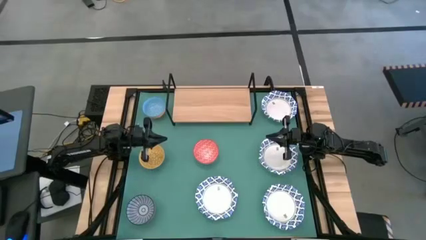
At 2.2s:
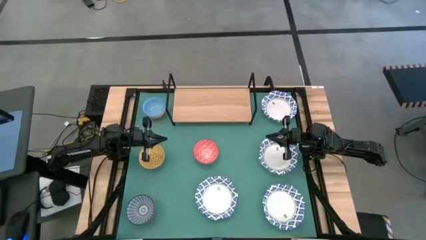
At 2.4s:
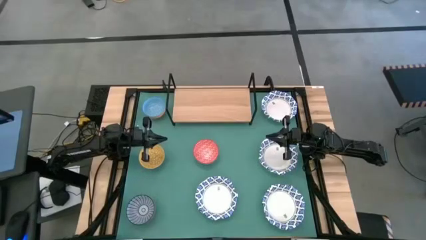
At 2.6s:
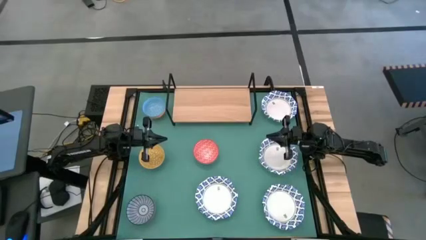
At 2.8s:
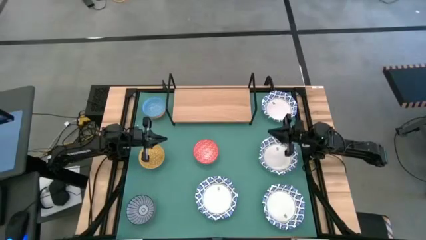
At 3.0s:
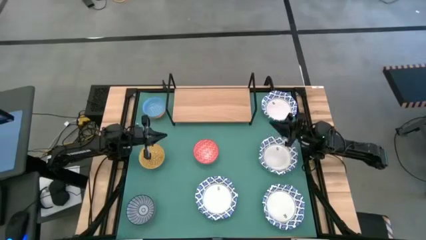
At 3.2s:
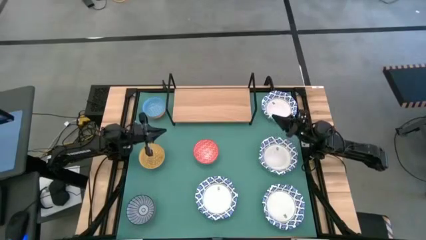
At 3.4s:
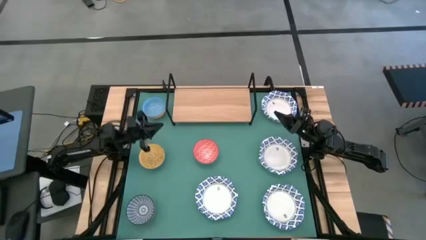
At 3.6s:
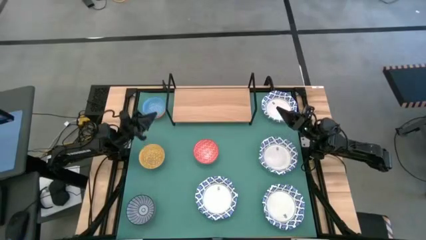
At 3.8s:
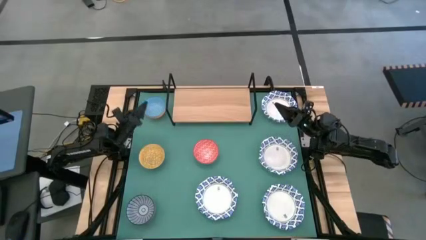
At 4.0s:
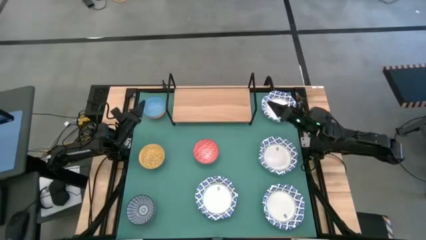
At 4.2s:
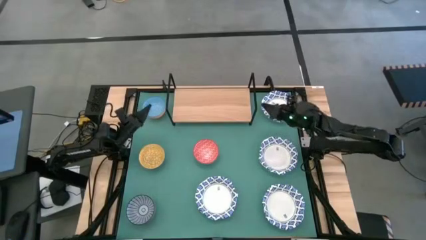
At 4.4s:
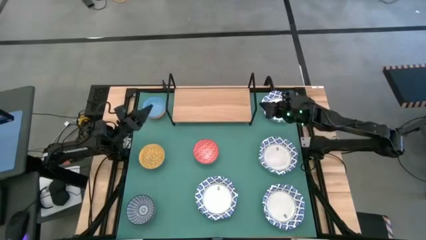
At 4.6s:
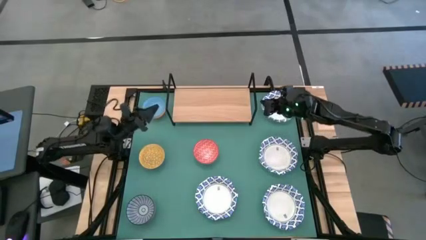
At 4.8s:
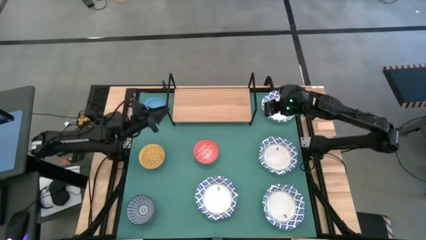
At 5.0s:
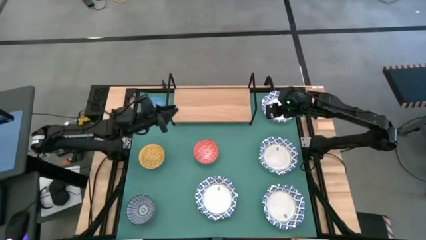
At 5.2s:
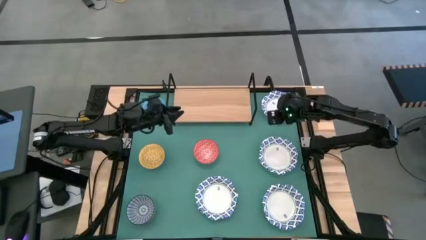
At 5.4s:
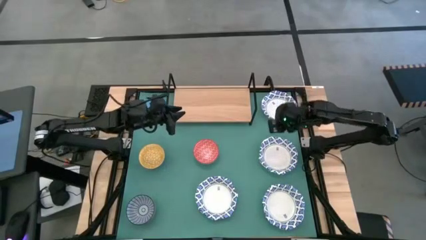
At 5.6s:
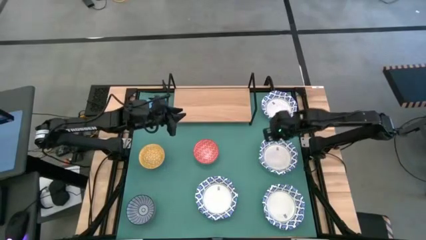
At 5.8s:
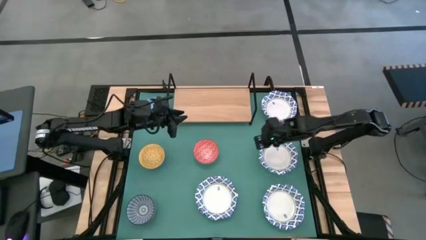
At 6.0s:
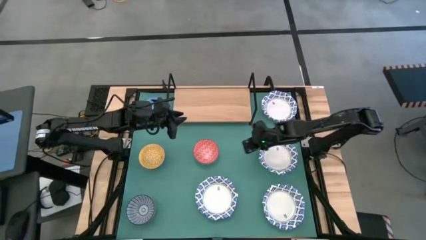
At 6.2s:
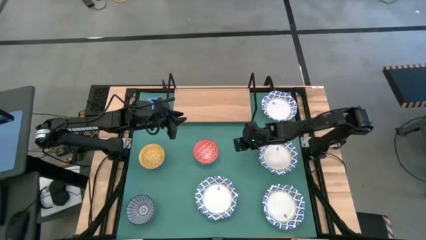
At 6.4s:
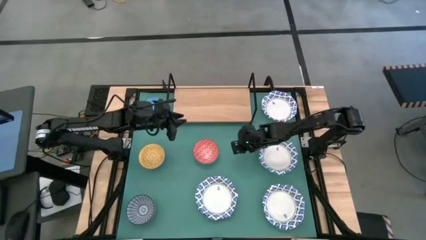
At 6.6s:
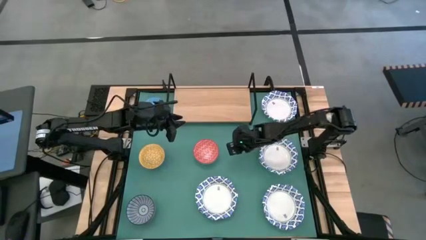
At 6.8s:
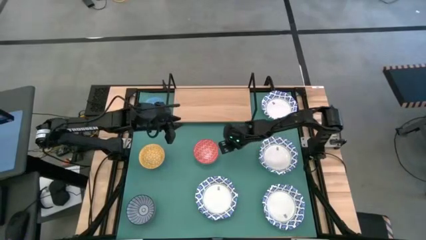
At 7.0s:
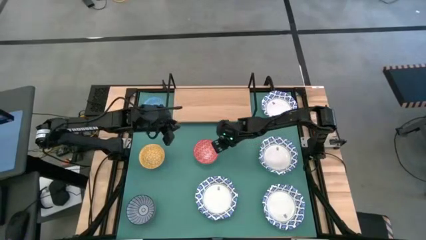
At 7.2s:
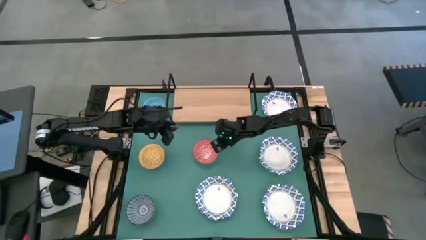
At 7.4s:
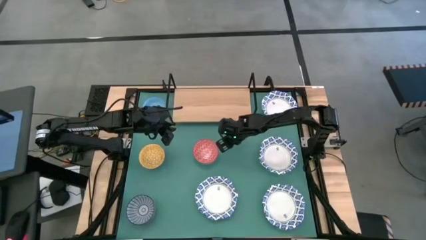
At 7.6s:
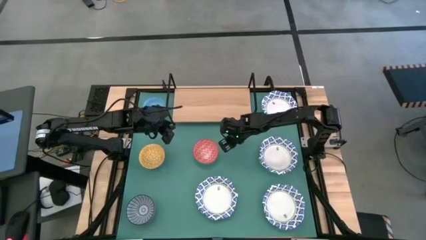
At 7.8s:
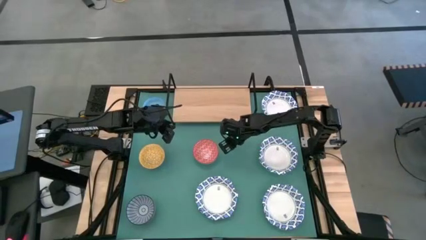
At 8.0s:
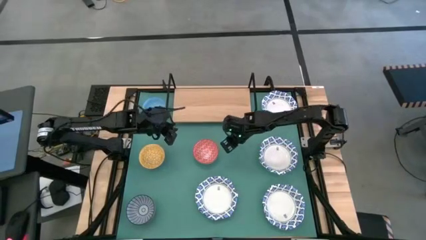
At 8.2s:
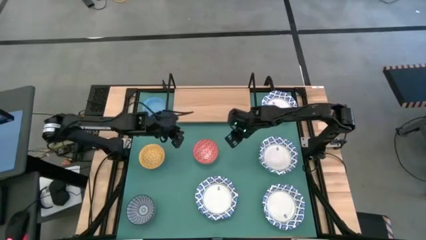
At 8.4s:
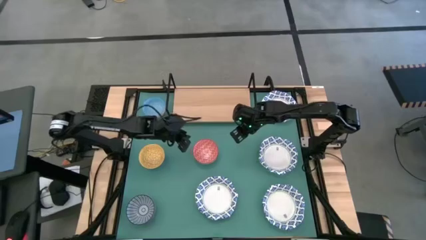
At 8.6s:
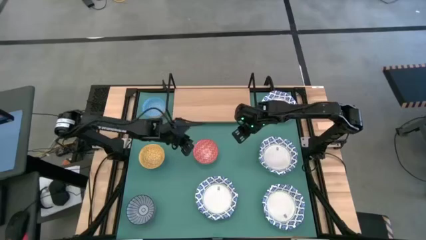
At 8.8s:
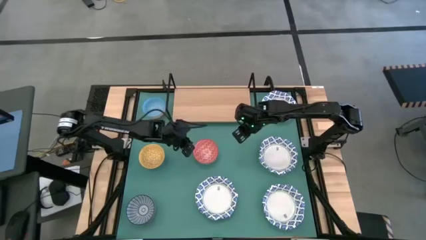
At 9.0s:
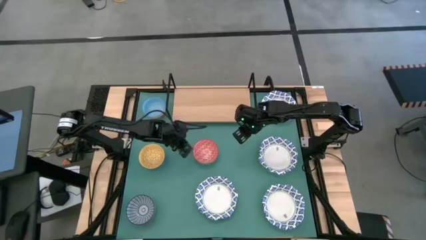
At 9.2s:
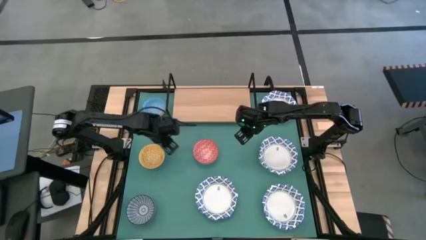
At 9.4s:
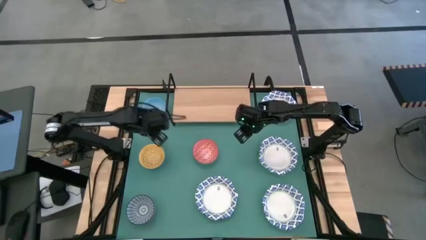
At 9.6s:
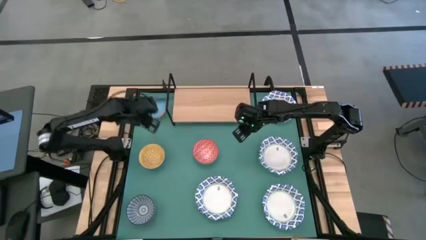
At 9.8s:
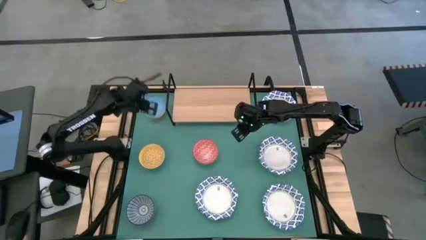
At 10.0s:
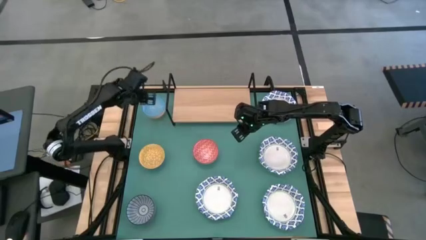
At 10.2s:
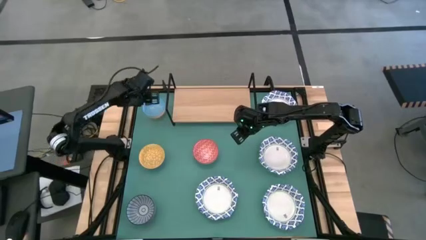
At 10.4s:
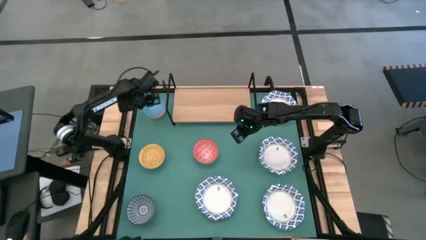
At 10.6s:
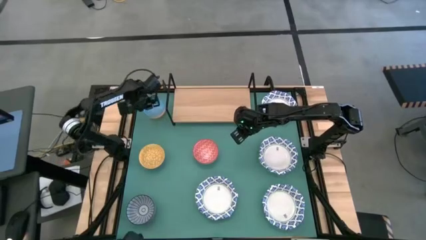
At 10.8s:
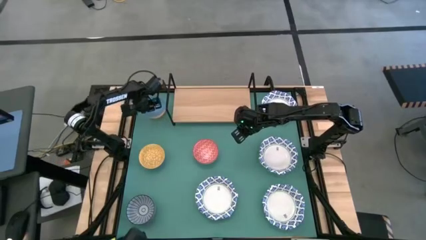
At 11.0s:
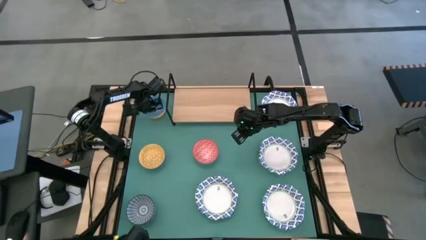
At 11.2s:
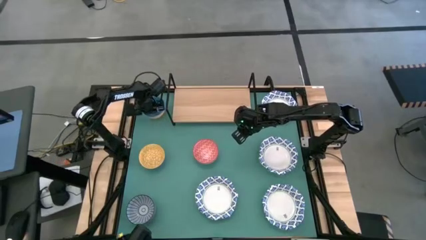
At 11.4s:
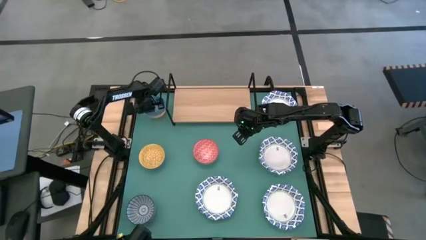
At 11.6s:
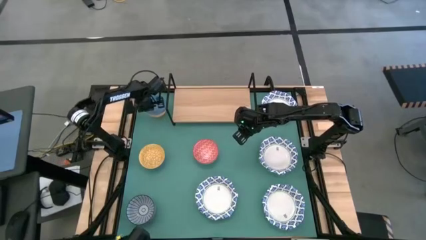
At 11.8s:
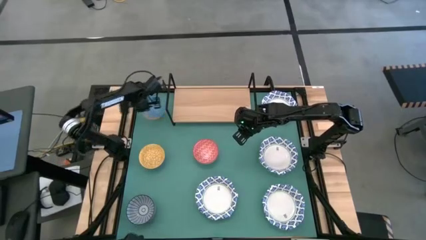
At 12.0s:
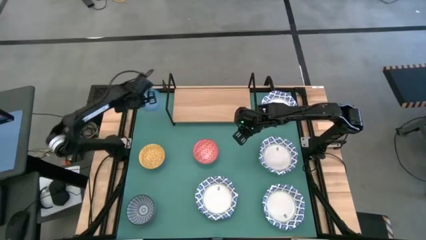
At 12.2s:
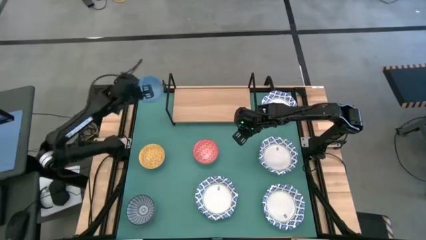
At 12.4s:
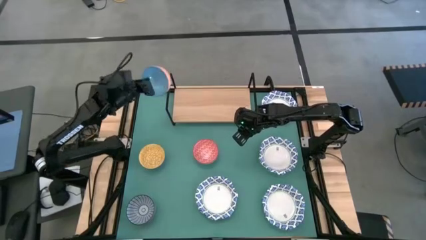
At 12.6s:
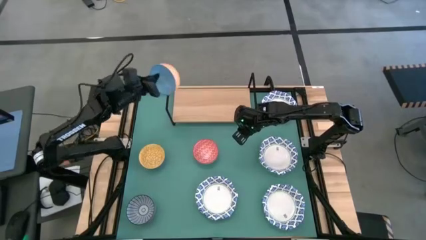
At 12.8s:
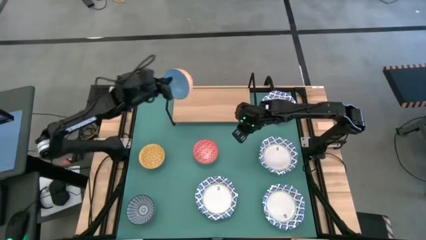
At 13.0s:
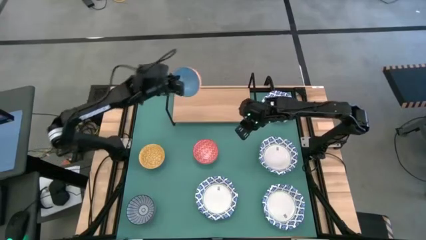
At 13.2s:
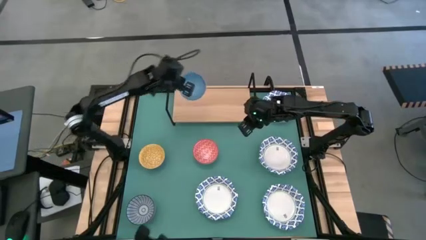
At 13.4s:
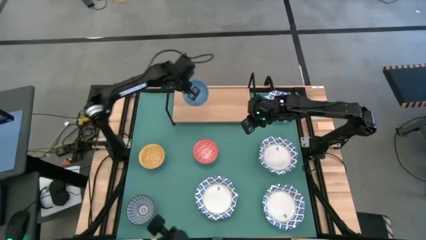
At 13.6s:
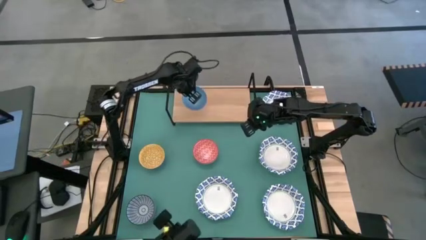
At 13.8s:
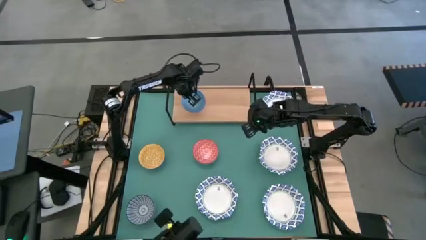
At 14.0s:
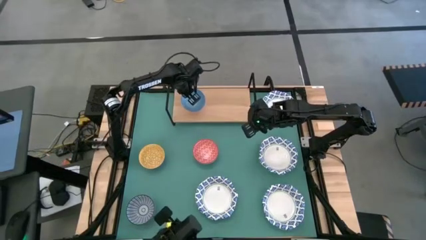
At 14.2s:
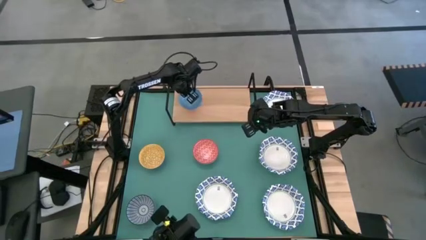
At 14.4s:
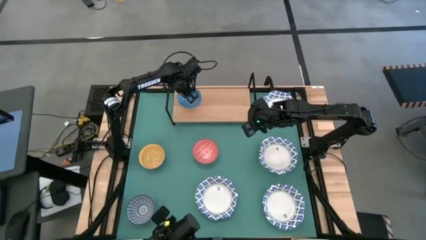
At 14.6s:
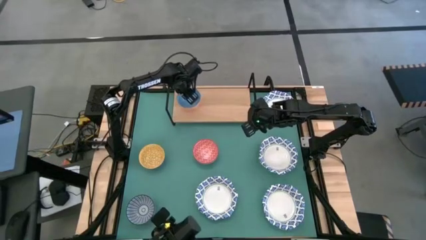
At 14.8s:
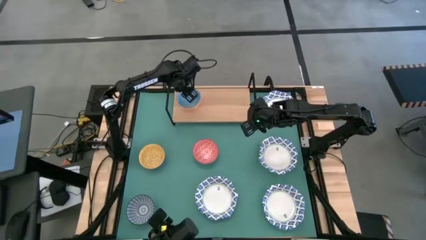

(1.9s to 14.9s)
Task: Place and stack bowls onto a shelf
Put the light blue patterned bowl on the shelf
